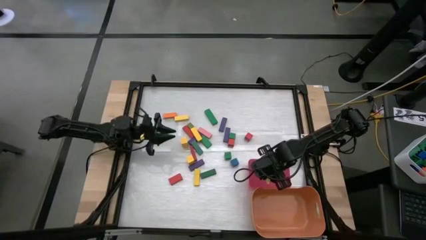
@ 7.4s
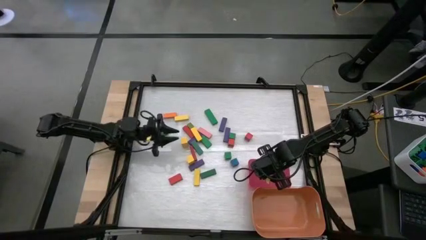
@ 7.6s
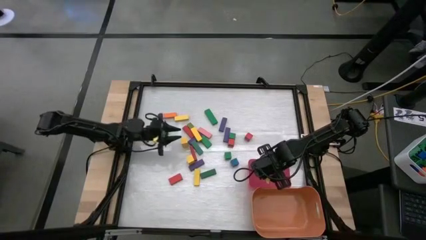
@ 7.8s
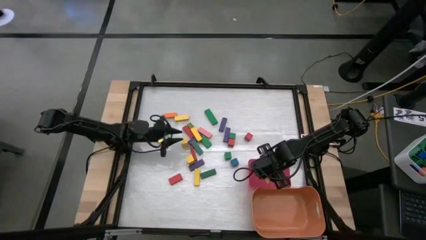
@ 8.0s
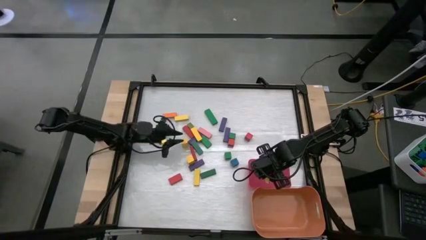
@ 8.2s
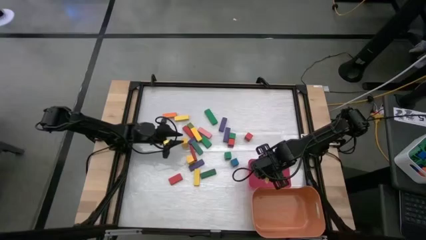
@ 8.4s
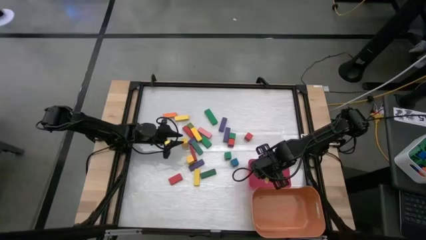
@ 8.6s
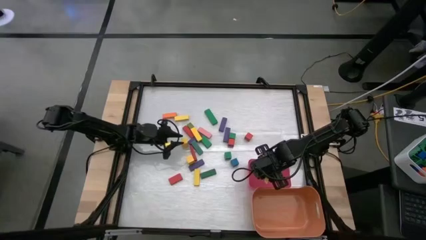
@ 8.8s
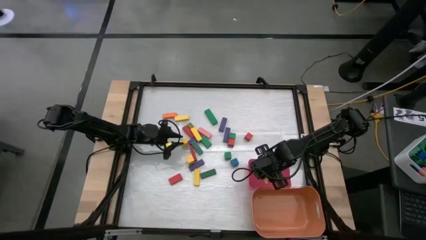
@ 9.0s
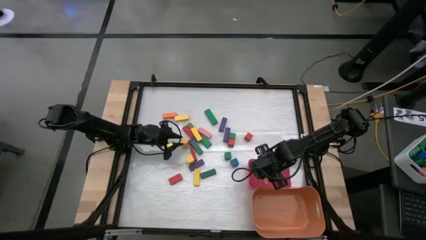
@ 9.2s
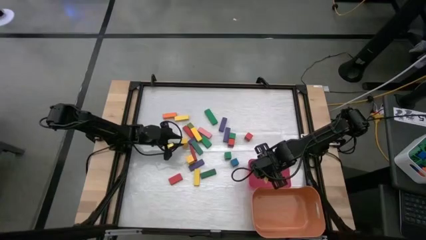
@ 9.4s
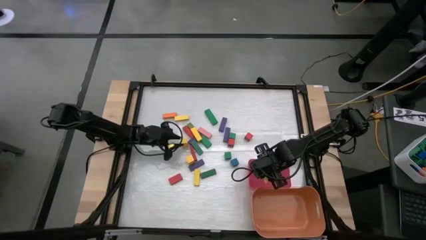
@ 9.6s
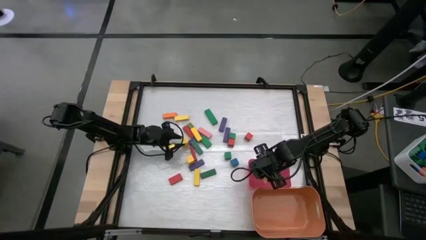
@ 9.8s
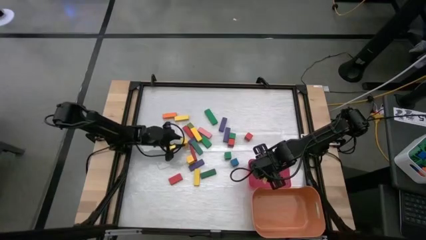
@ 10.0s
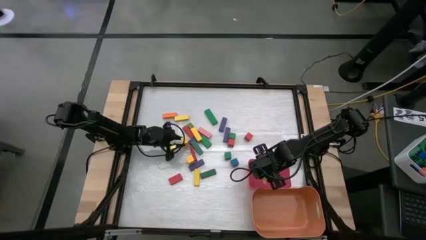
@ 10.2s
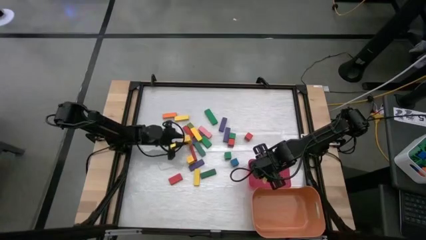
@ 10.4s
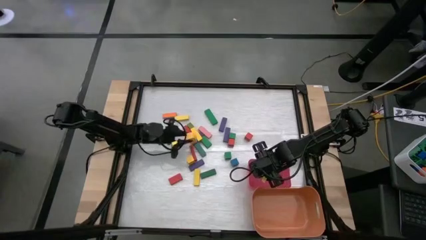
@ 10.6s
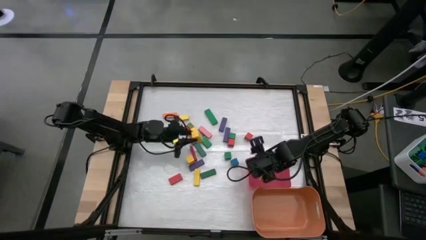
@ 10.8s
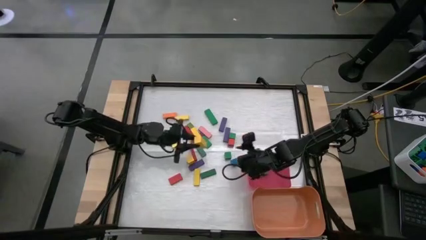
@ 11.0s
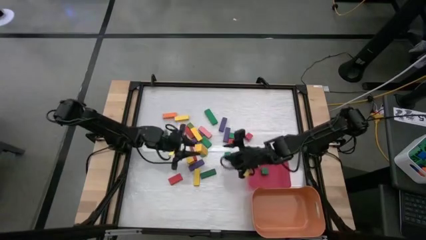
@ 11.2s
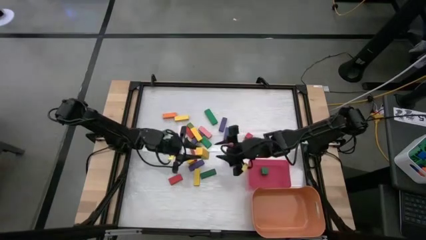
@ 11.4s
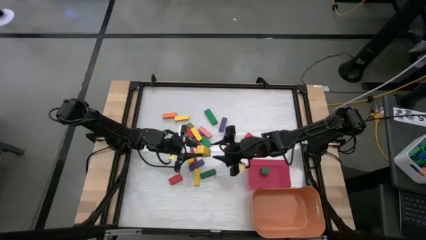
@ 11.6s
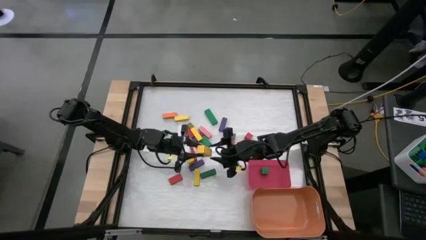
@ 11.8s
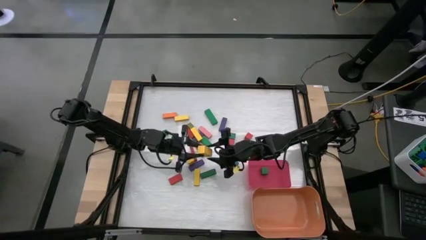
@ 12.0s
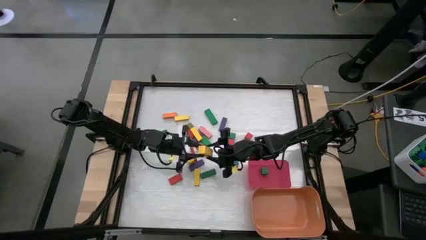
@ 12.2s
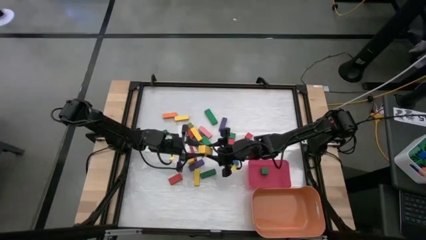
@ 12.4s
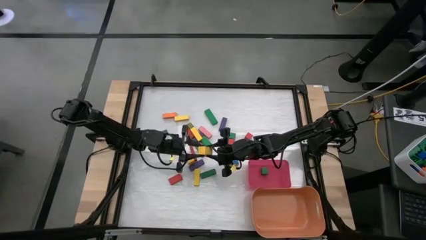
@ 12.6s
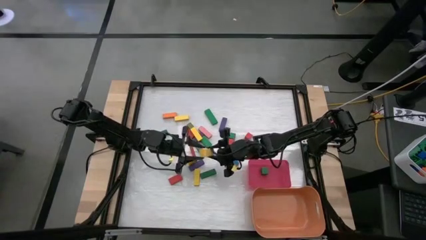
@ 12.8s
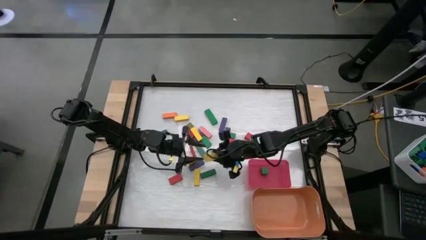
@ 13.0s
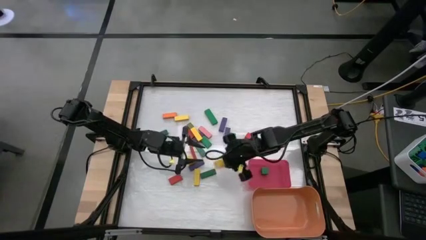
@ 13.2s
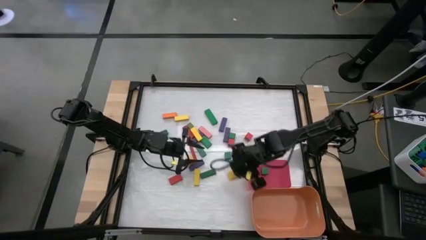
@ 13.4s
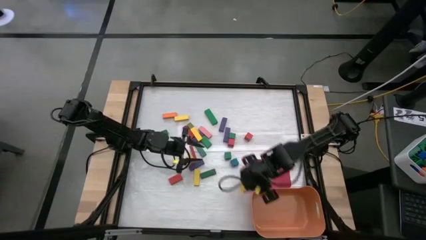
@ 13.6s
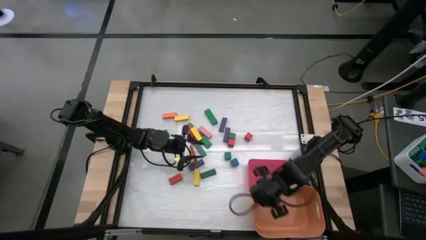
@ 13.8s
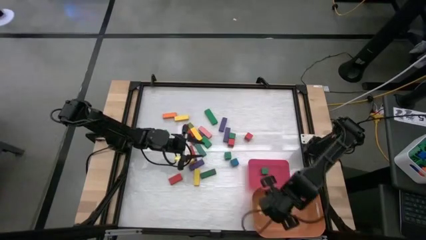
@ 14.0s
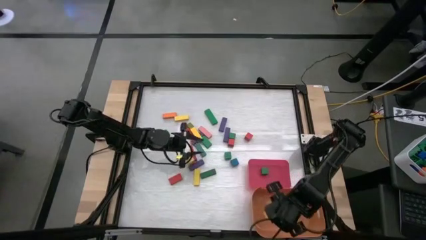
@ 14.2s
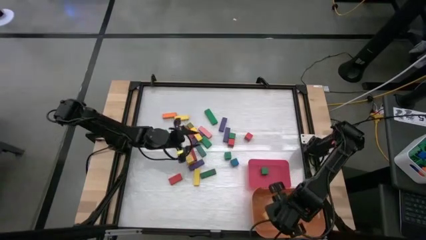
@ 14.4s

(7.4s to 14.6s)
Task: Sort blocks by size
Put the yellow rectangle block into the orange bin

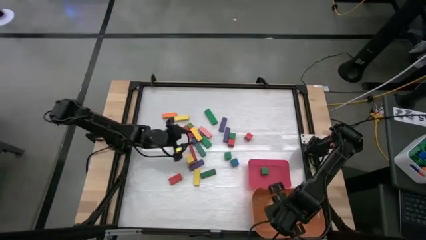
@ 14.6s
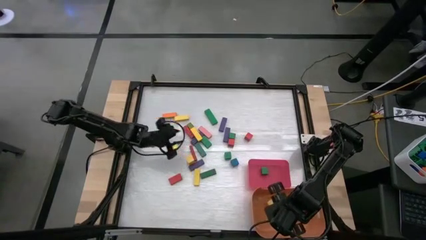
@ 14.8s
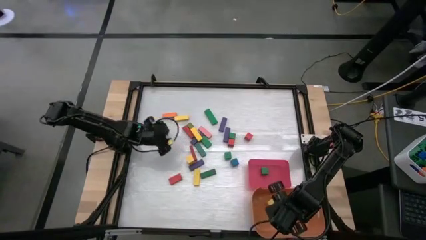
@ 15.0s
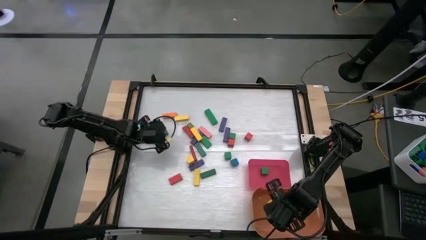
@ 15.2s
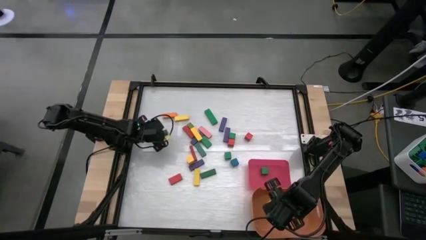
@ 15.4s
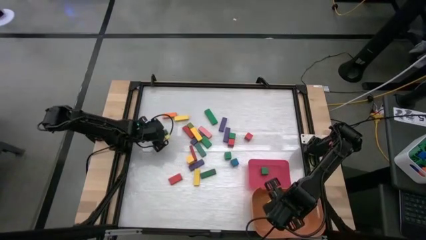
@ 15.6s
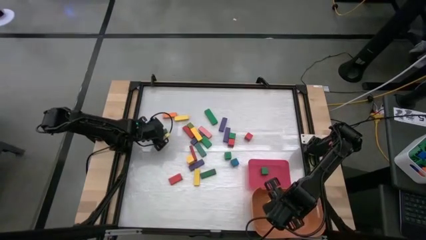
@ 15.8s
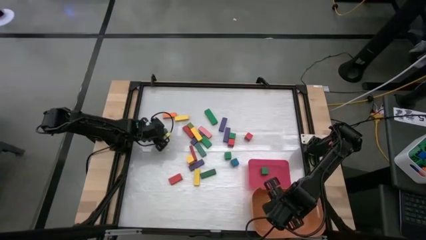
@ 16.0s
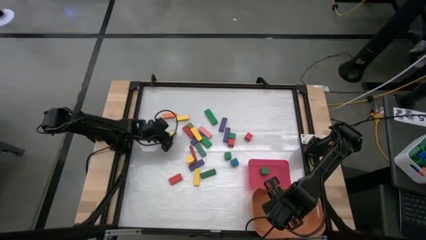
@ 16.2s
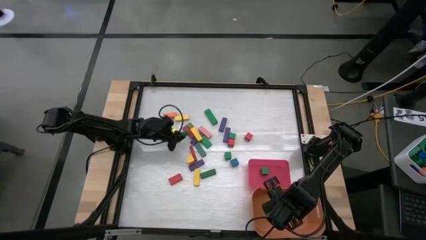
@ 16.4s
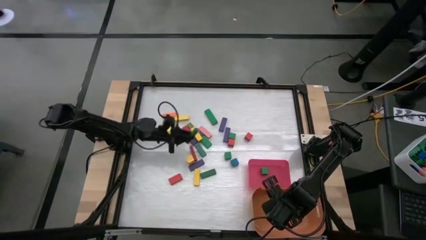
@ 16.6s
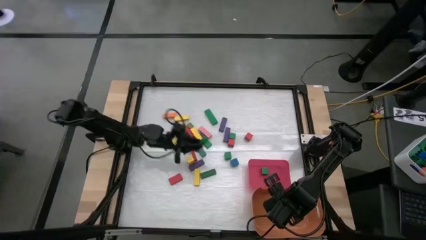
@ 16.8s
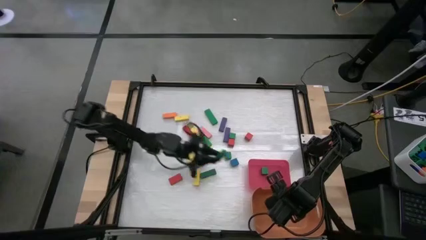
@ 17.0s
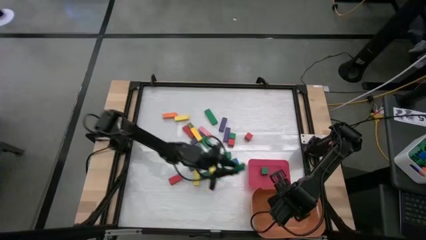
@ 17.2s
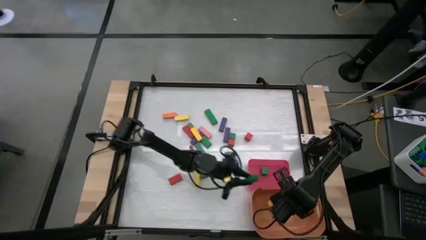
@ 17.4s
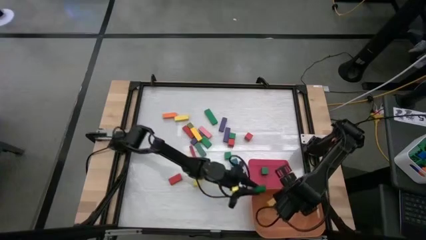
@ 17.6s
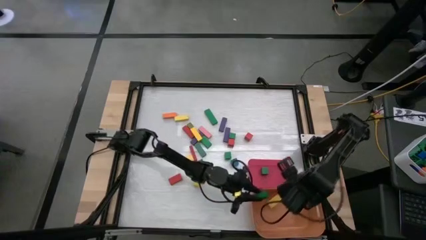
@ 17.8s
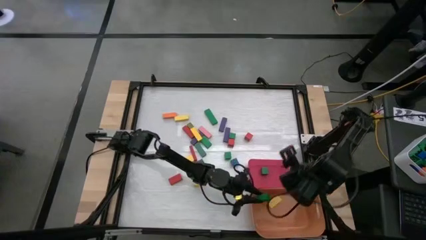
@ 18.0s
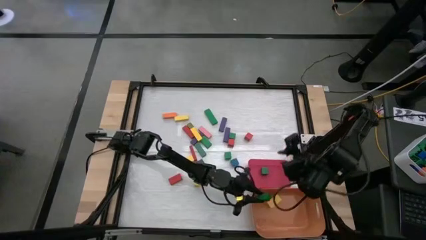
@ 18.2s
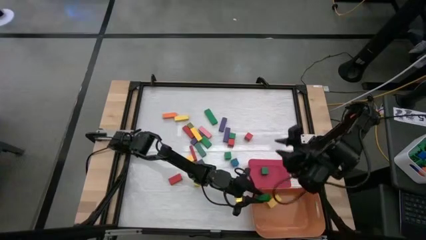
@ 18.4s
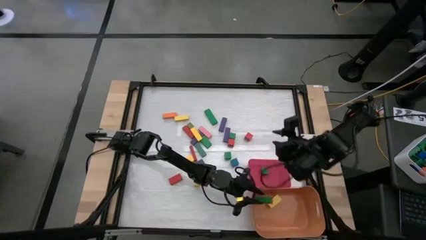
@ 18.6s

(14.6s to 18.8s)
Put the green rectangle block into the orange bin

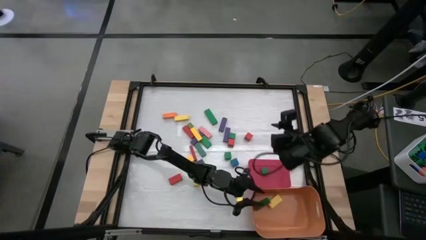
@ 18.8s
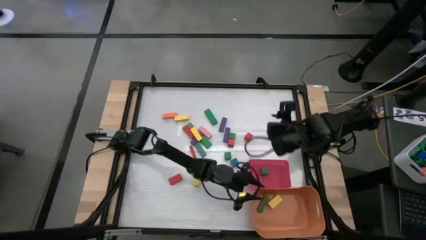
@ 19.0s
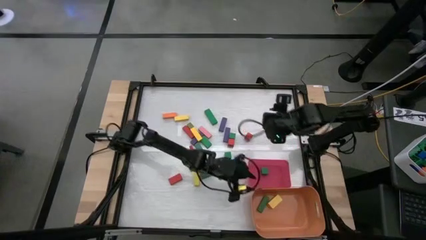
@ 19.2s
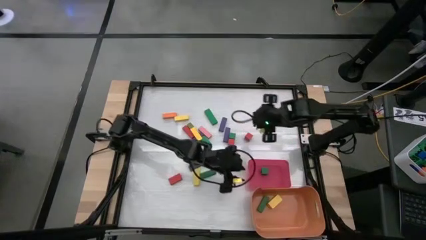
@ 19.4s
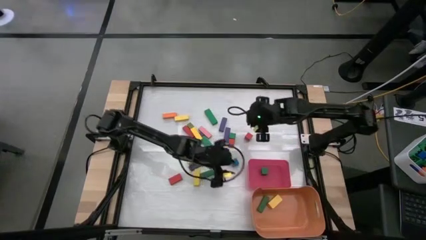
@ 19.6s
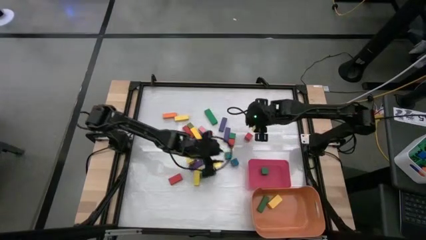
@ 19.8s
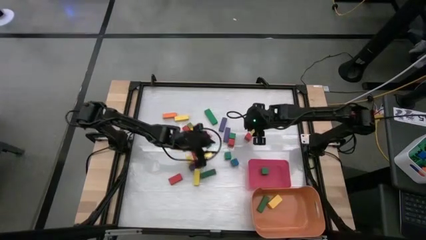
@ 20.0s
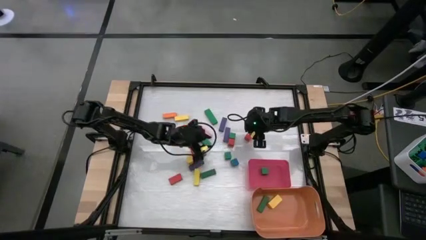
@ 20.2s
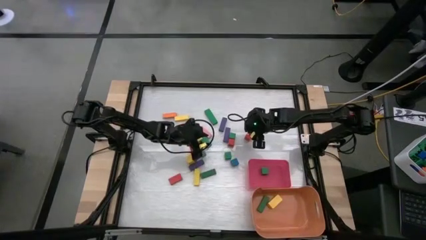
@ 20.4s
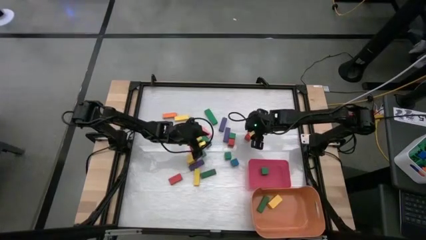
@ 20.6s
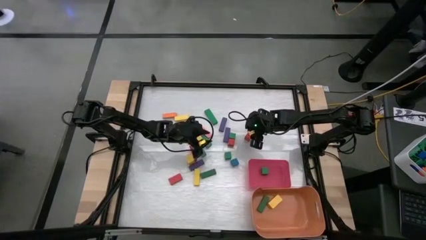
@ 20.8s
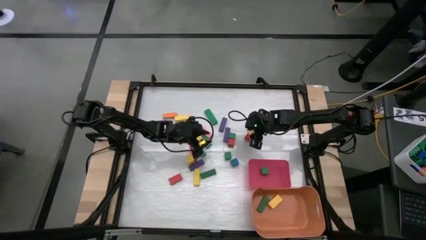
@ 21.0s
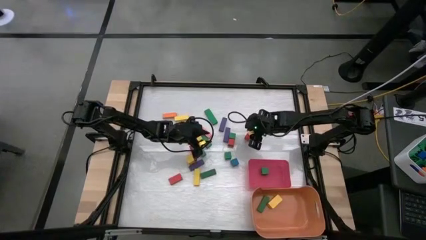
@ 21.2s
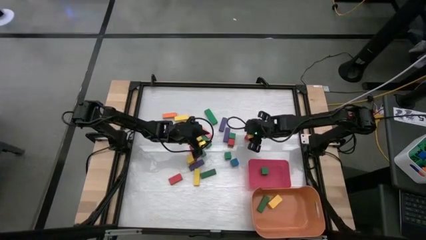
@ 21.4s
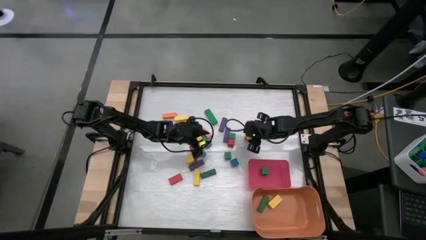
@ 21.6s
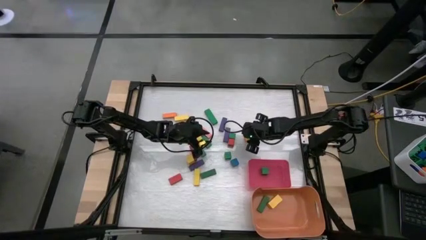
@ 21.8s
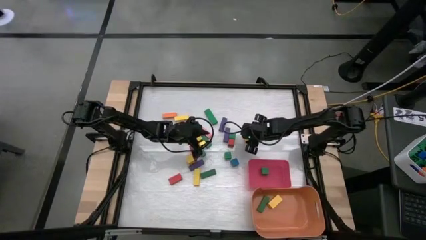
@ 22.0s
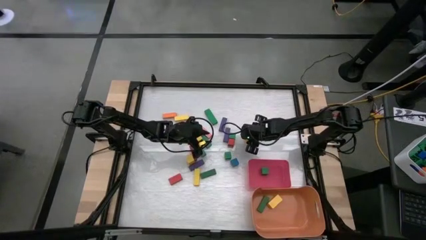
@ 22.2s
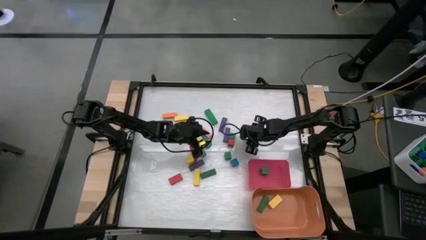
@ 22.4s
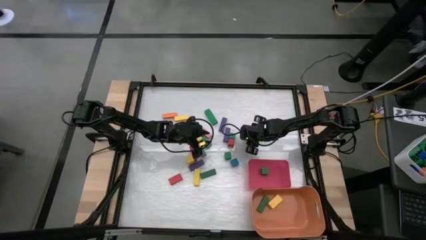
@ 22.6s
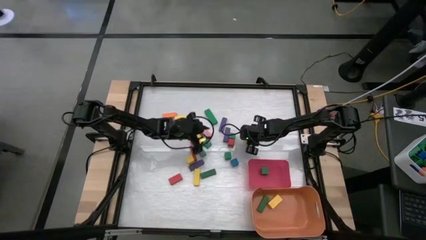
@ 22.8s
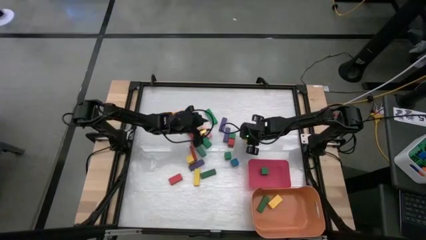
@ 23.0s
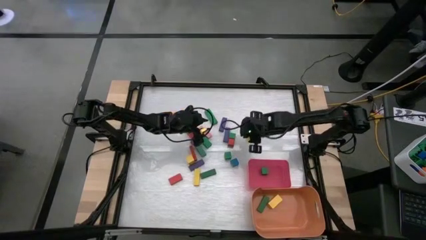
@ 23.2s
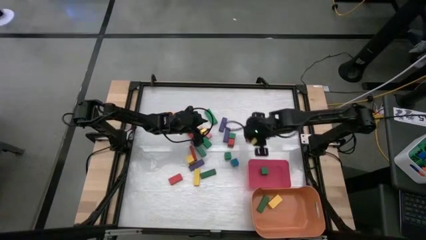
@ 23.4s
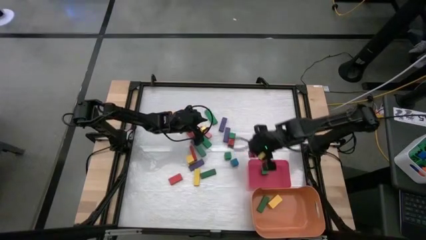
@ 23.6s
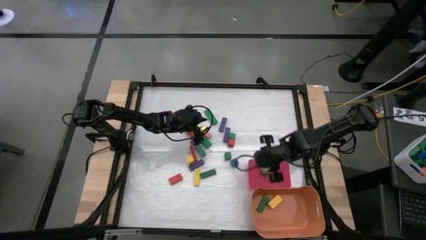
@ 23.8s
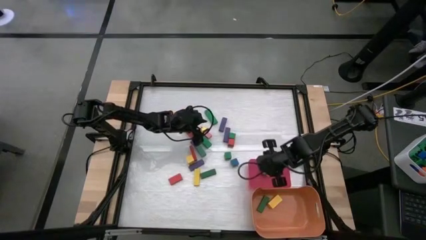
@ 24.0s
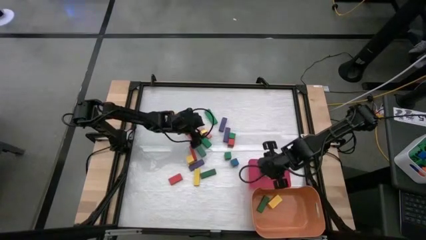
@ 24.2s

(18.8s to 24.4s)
Put the red square block into the pink bin
